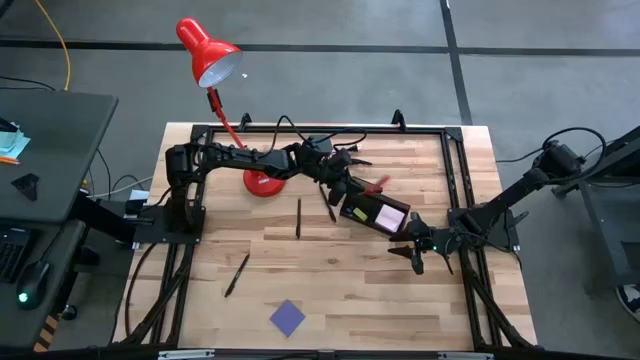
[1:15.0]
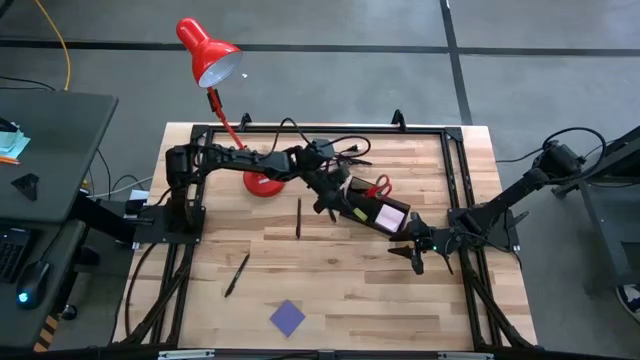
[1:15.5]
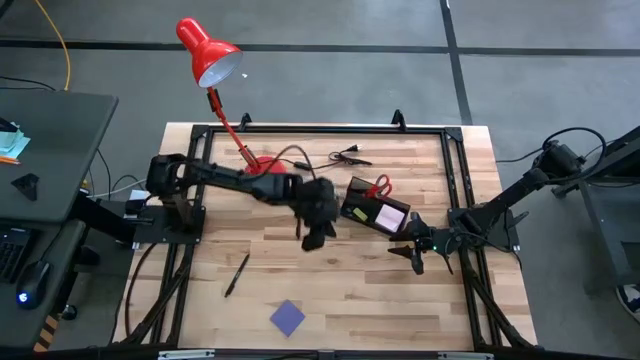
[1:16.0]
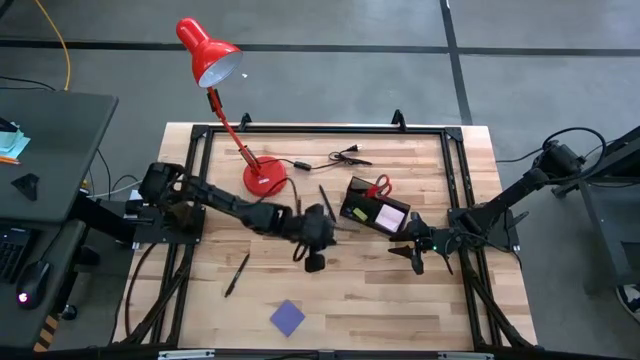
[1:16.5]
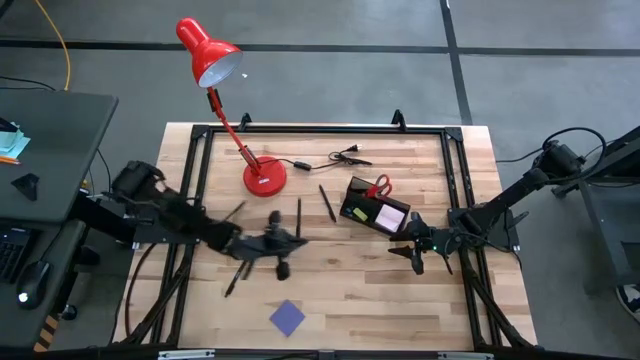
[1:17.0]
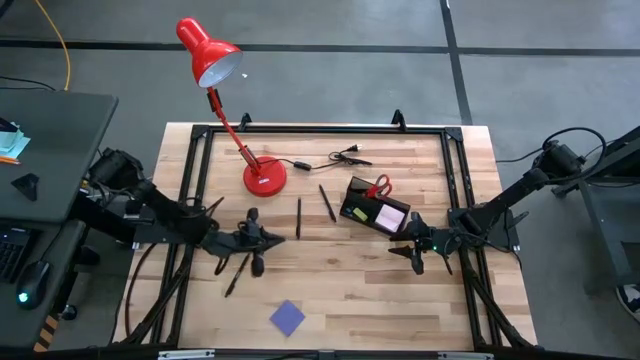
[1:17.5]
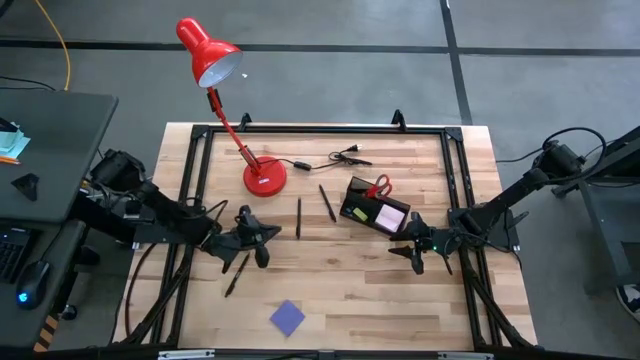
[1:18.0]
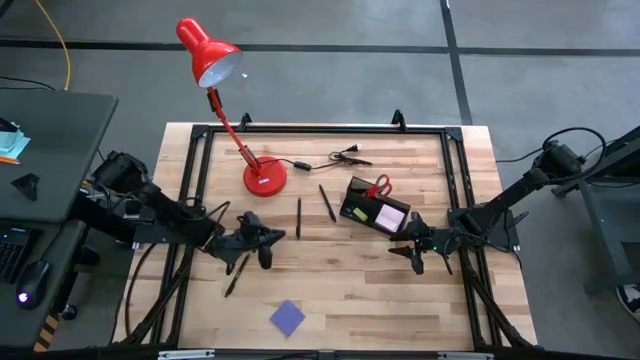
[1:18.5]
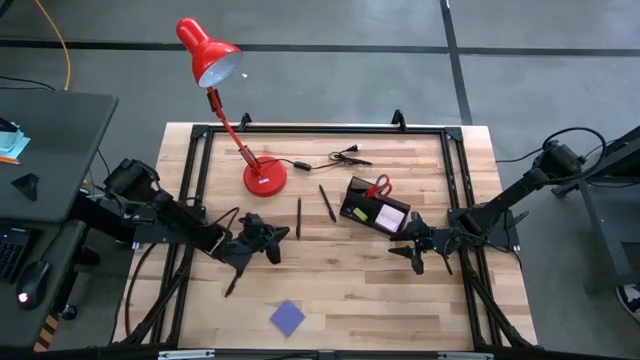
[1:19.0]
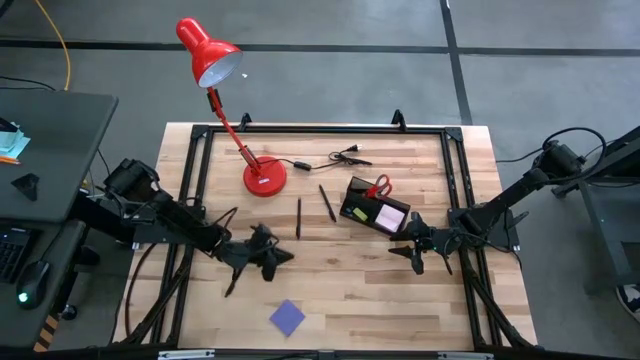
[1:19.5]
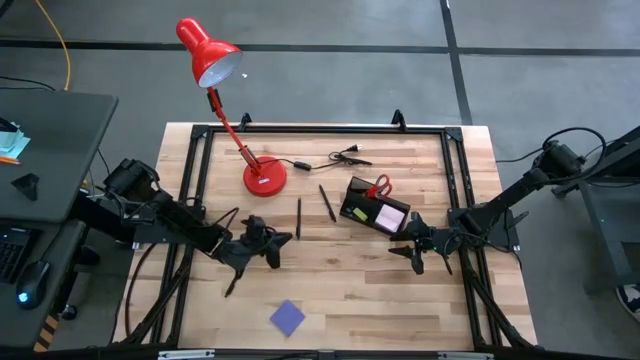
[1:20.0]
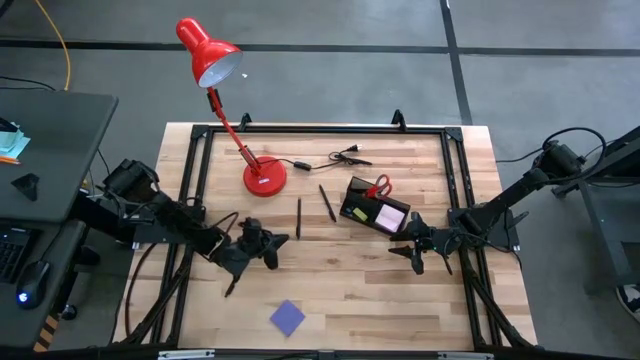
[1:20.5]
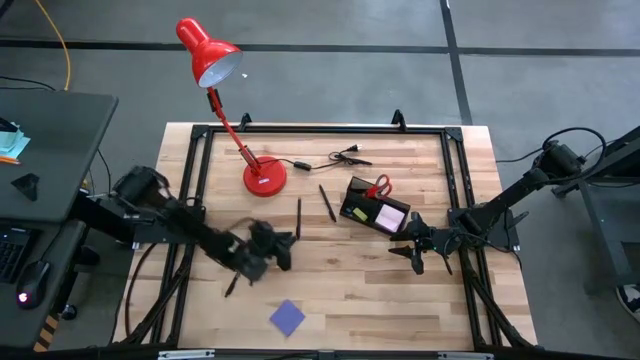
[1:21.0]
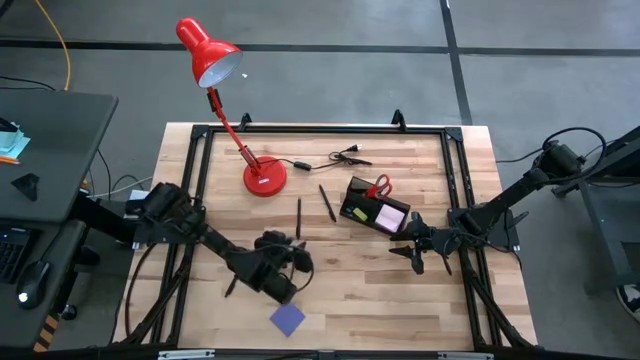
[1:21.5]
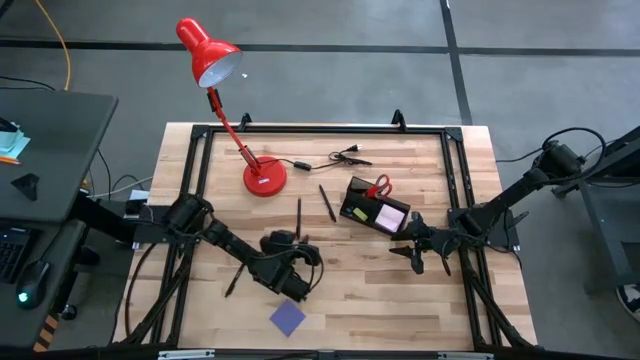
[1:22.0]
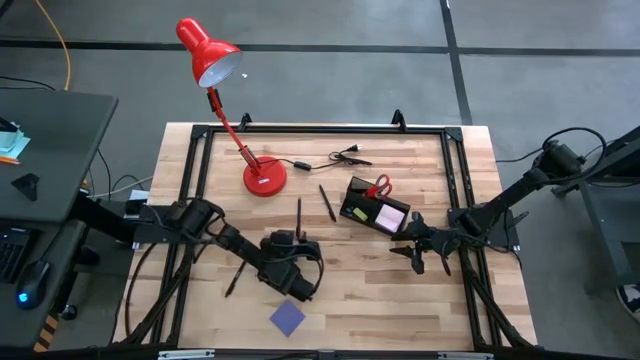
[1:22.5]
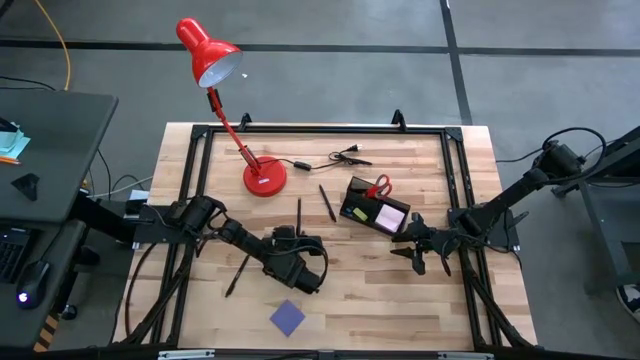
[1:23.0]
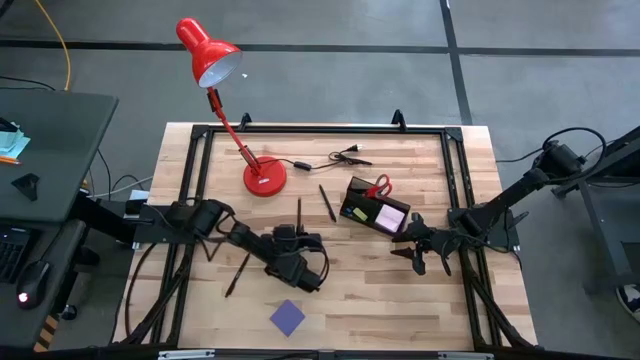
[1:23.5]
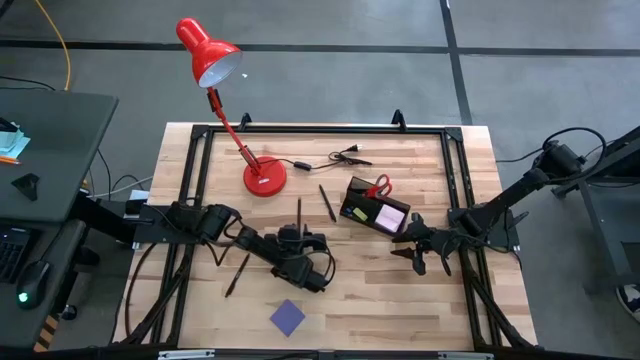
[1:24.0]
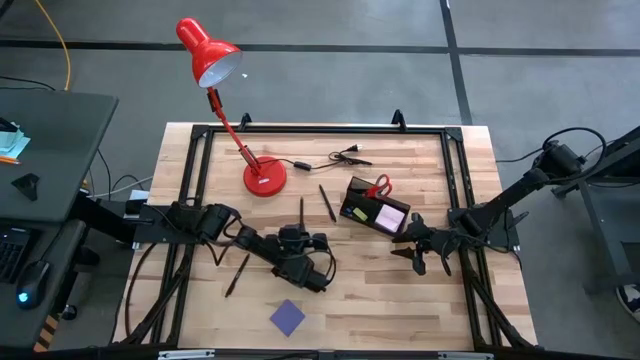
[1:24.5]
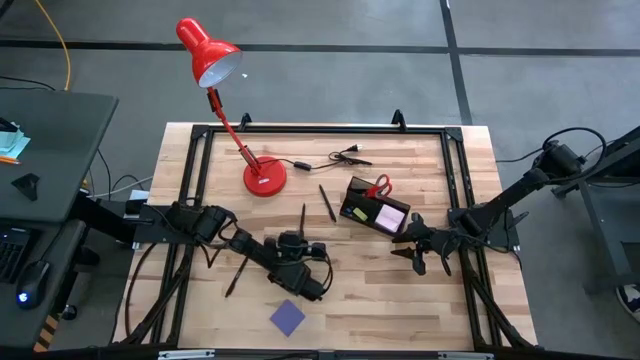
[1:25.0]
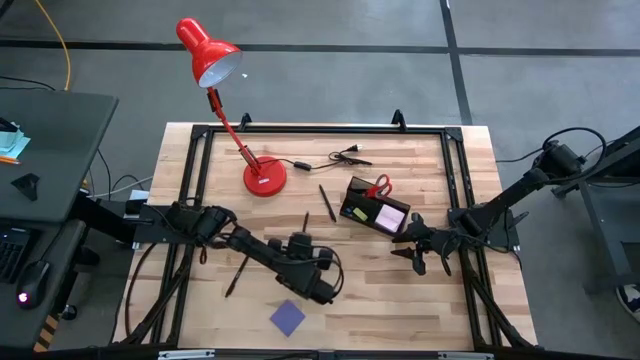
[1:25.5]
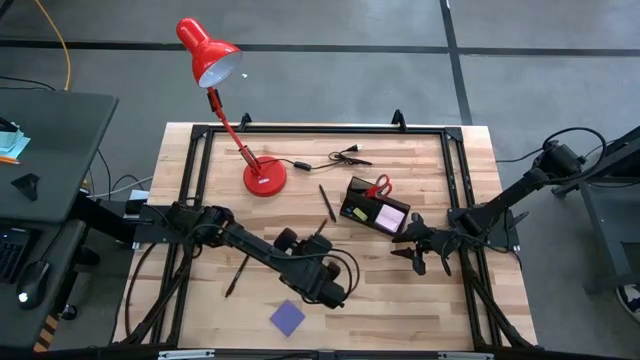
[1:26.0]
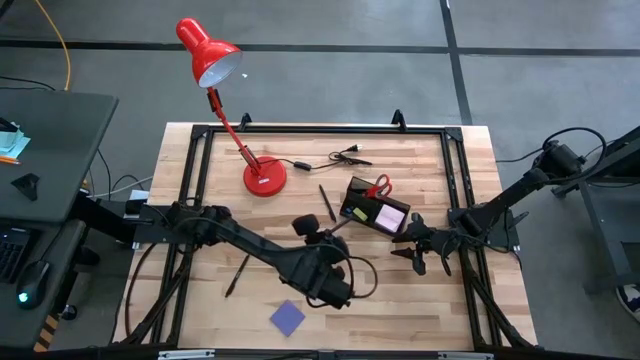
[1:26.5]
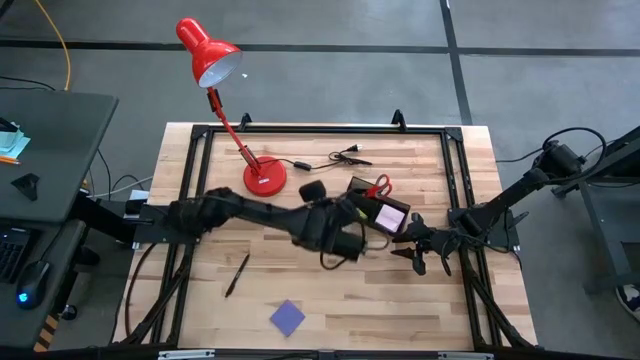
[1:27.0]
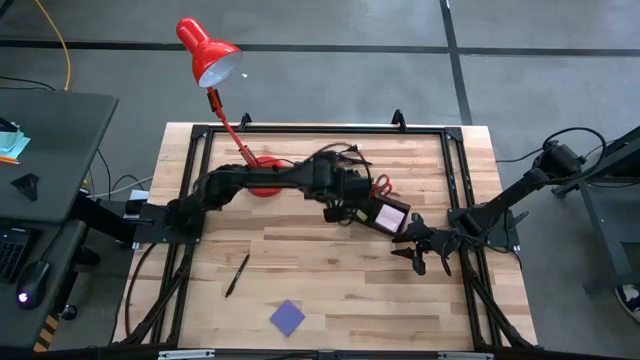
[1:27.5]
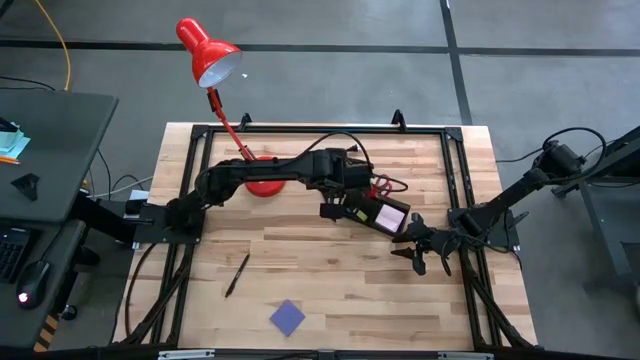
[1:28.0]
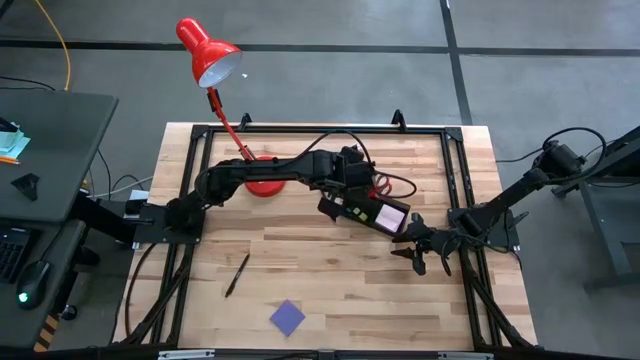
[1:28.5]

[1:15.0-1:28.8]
Task: Pick and place office supplies into organizer
Put the black pen into the desk organizer

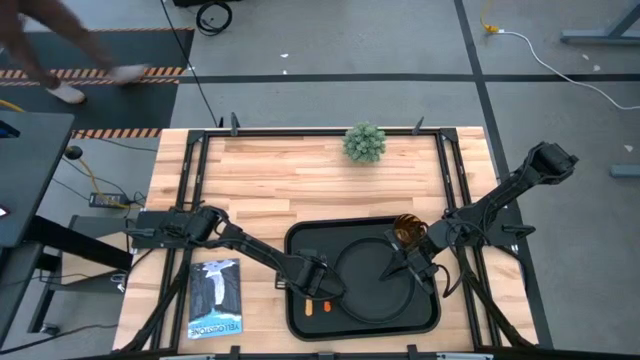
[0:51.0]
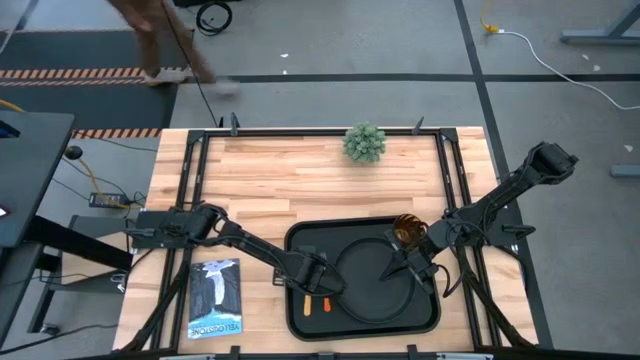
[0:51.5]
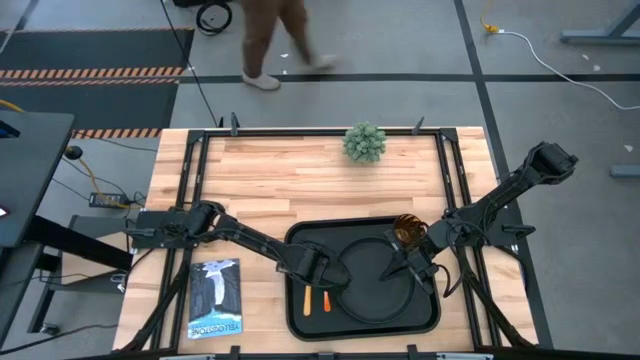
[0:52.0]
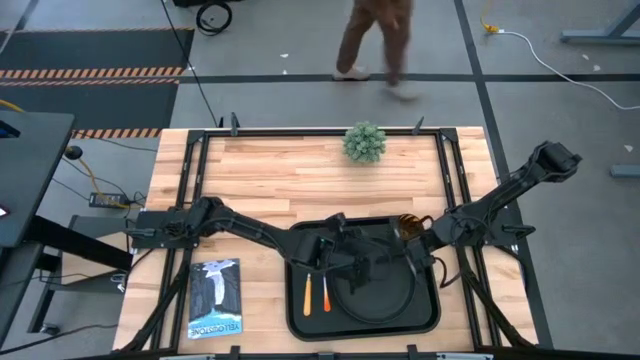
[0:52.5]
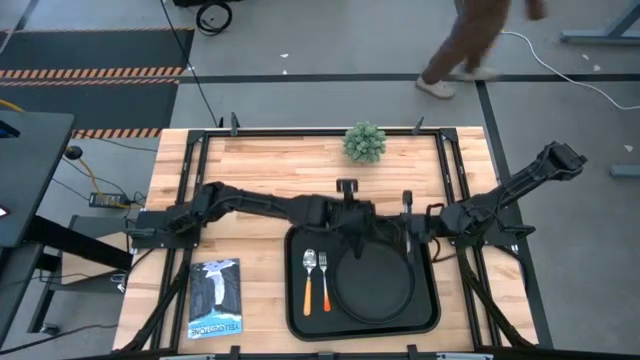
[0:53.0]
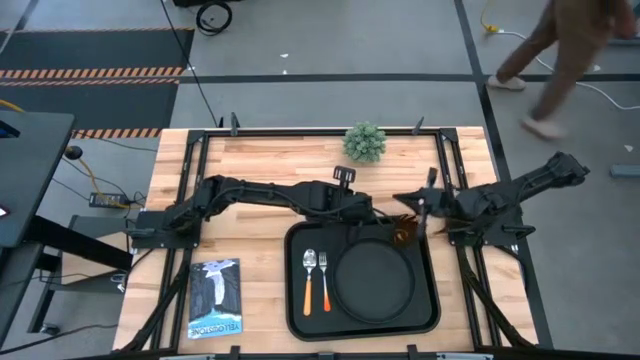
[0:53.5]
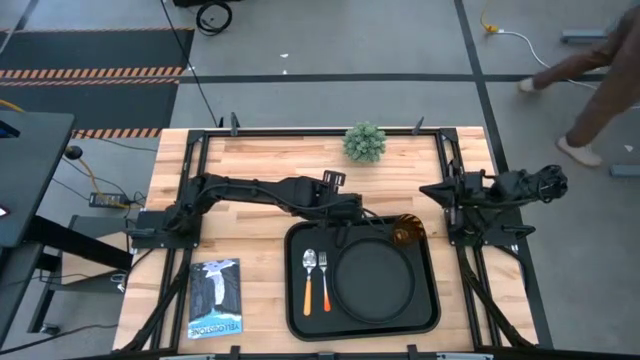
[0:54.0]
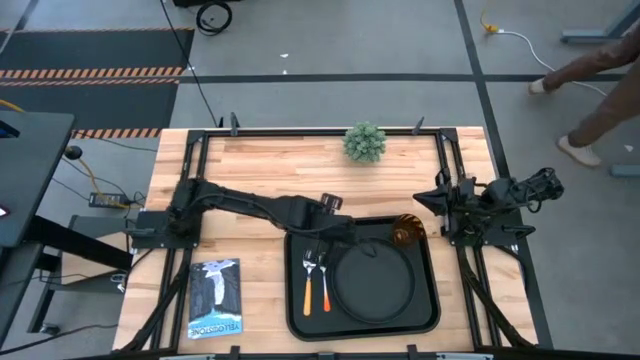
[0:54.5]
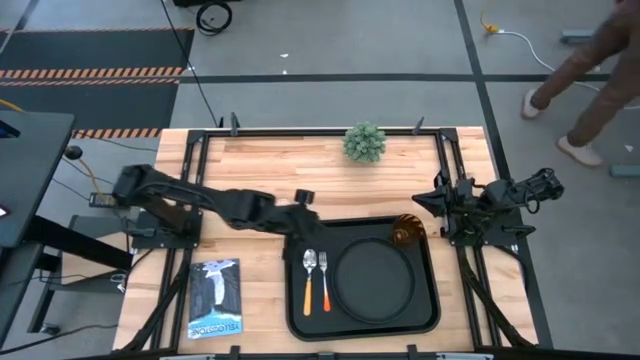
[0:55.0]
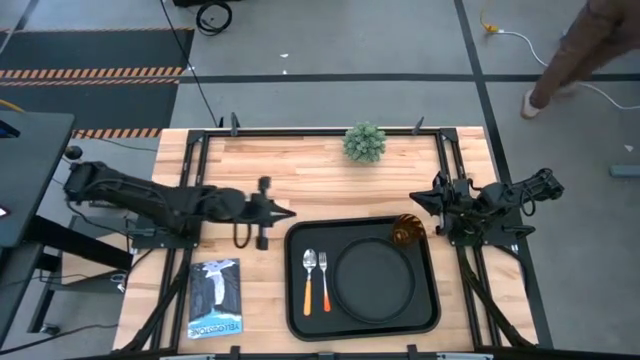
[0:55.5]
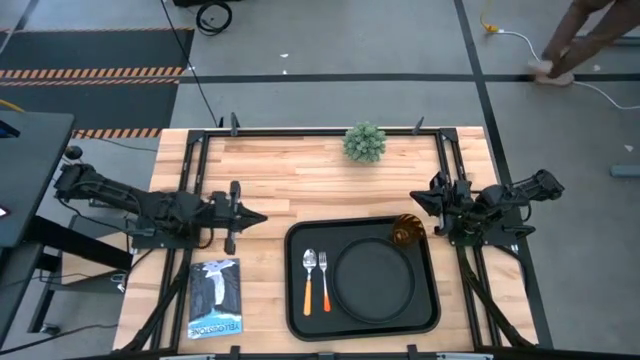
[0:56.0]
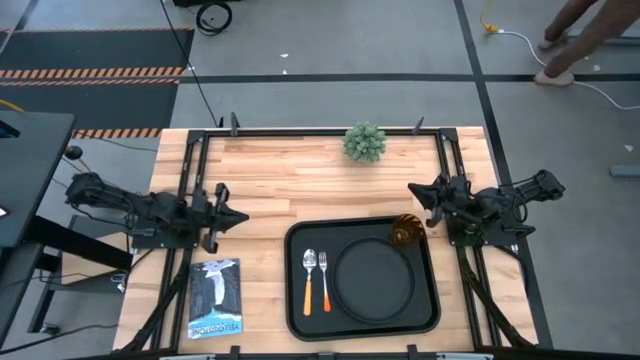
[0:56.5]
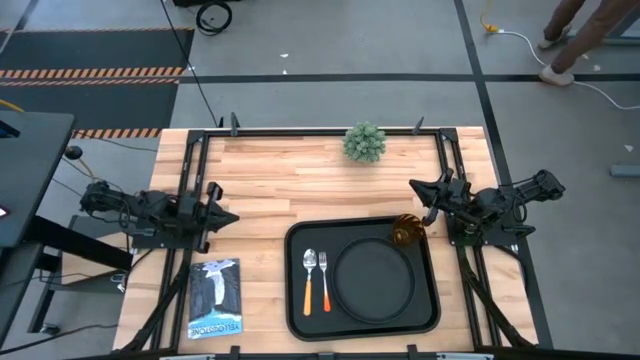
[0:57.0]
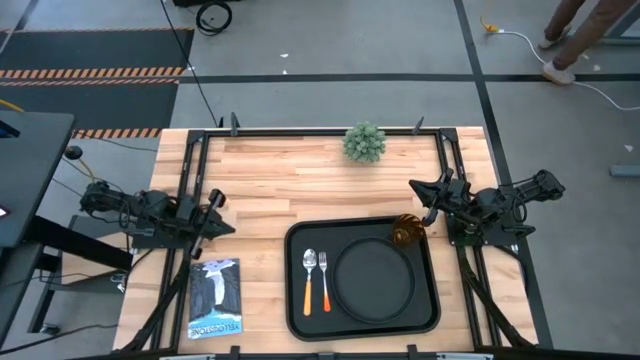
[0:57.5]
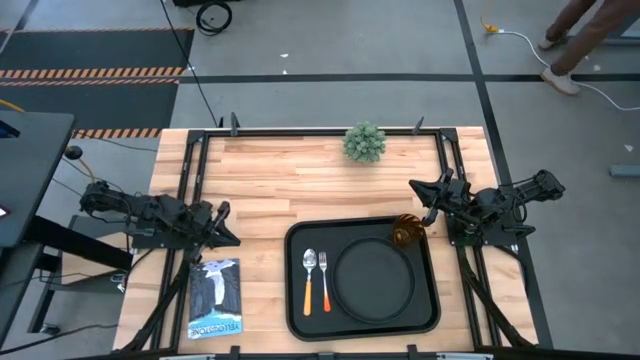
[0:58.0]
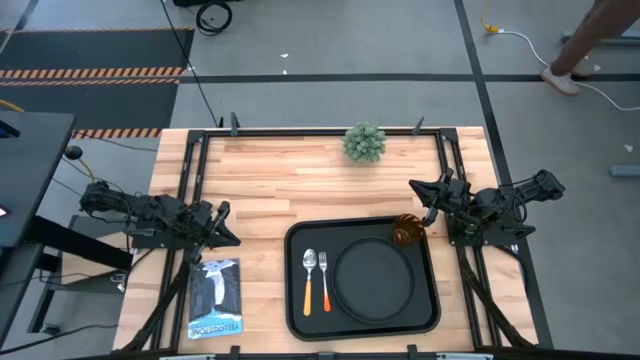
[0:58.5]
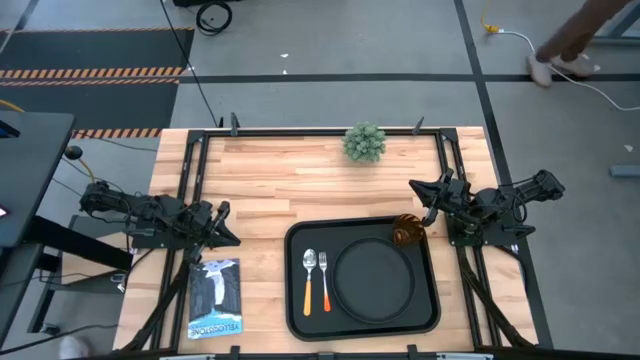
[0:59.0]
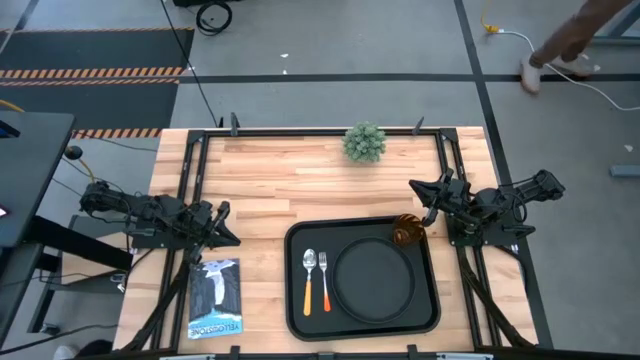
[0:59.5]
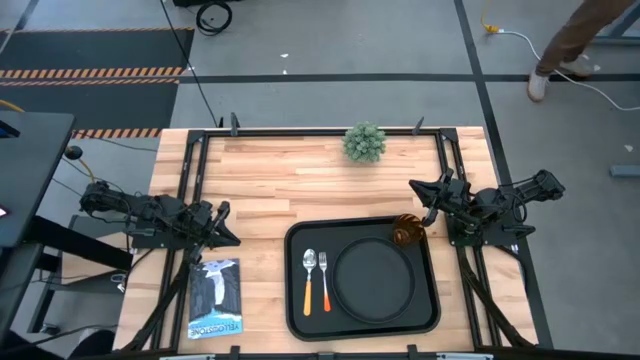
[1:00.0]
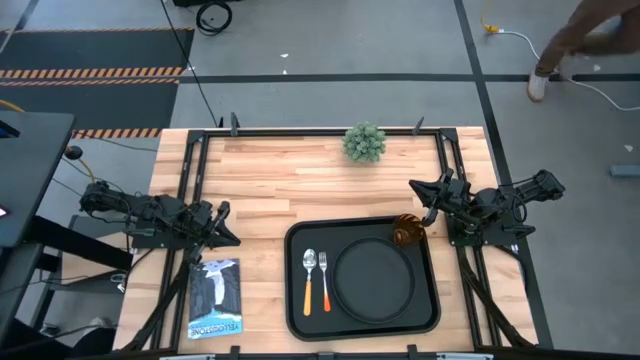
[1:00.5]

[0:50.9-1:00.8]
Task: Pick and place plate/cup/fork/spoon on tray
Return to Home Position
